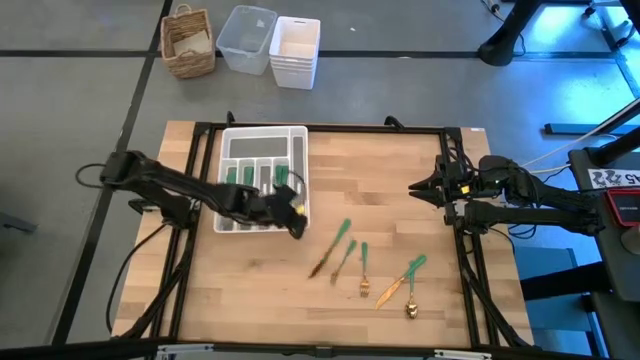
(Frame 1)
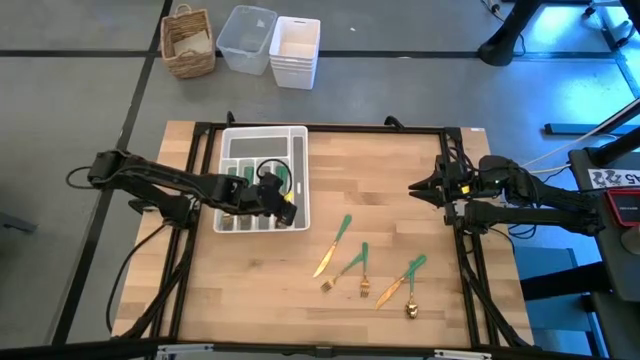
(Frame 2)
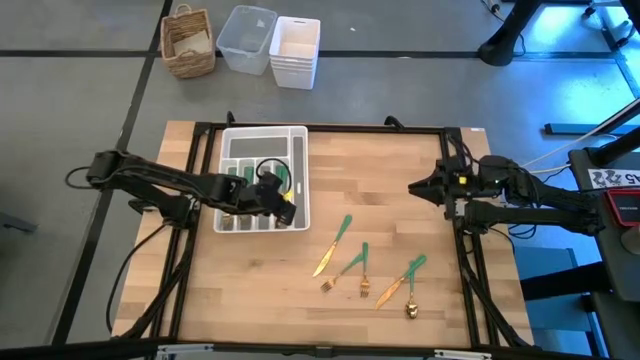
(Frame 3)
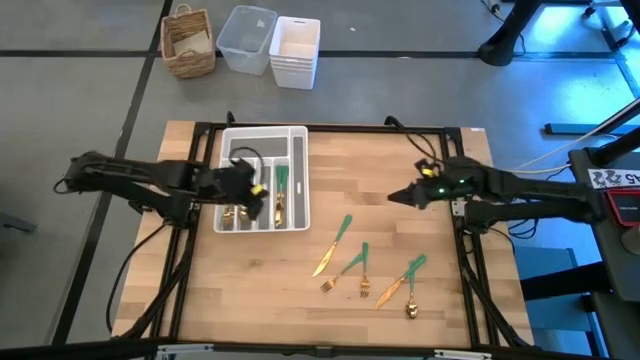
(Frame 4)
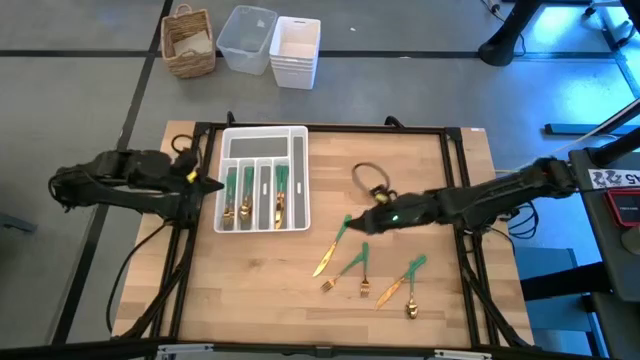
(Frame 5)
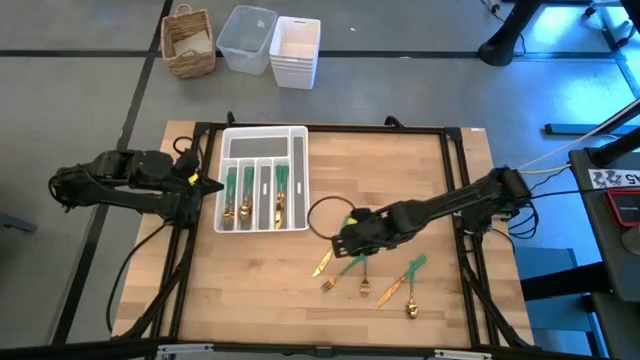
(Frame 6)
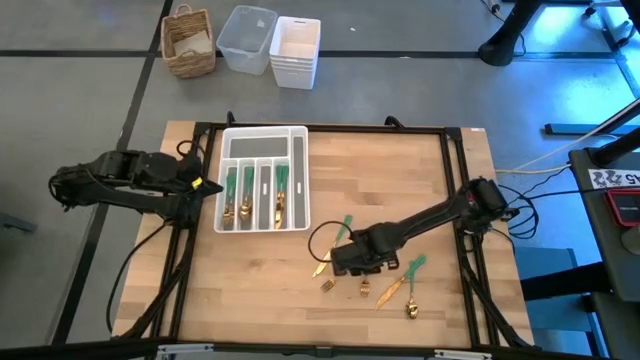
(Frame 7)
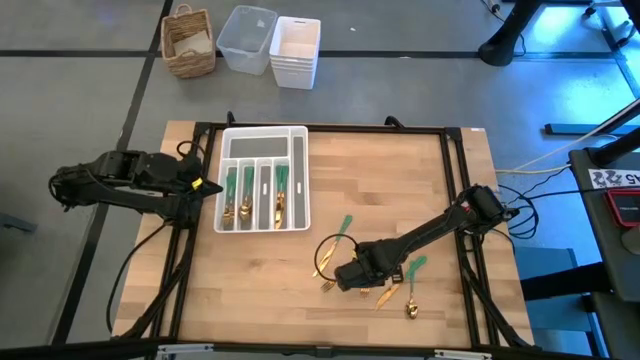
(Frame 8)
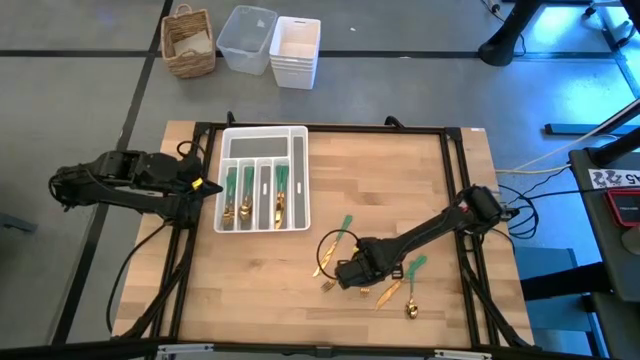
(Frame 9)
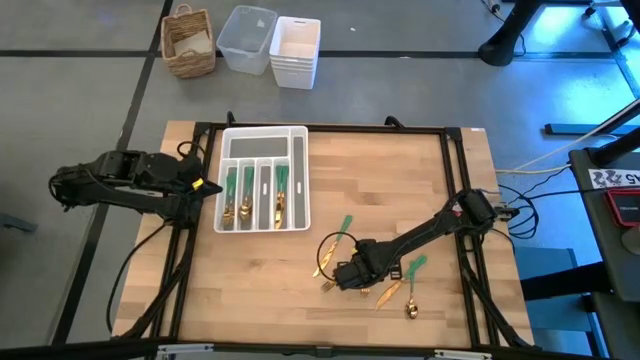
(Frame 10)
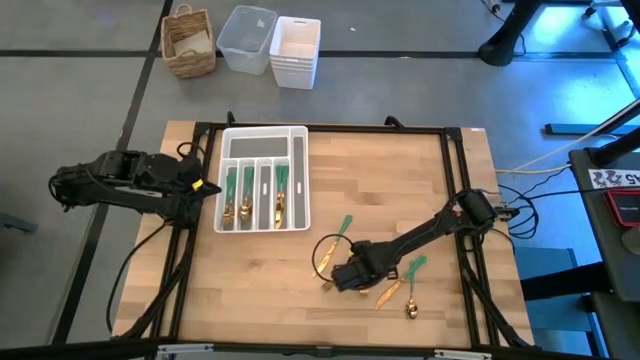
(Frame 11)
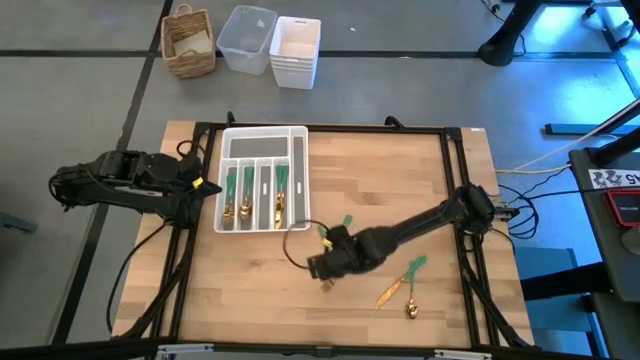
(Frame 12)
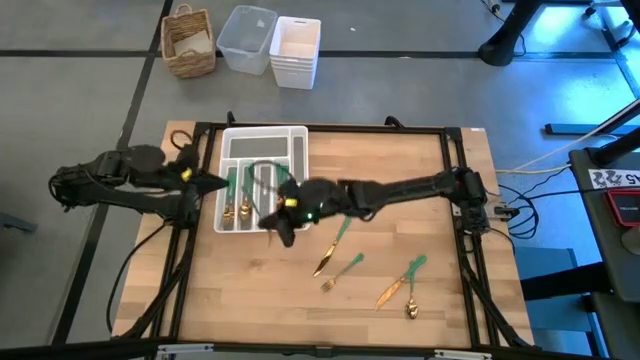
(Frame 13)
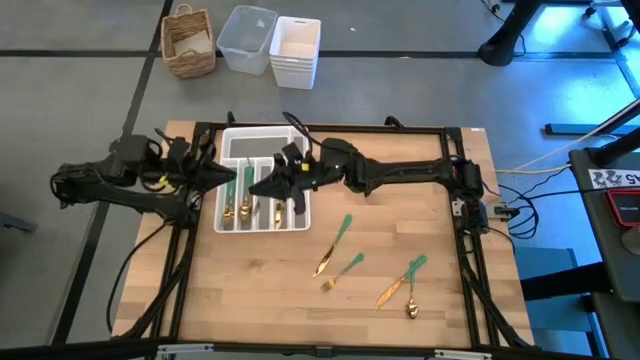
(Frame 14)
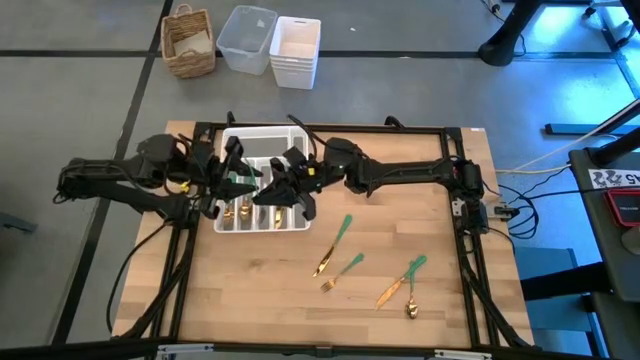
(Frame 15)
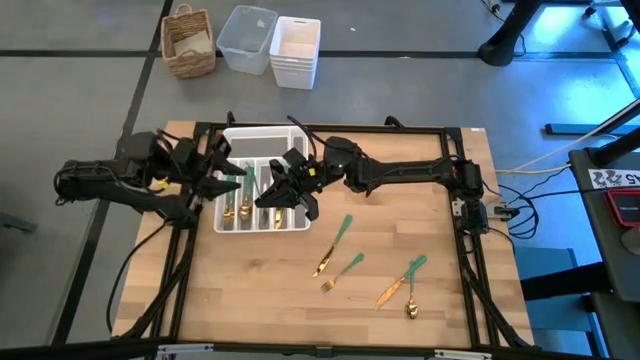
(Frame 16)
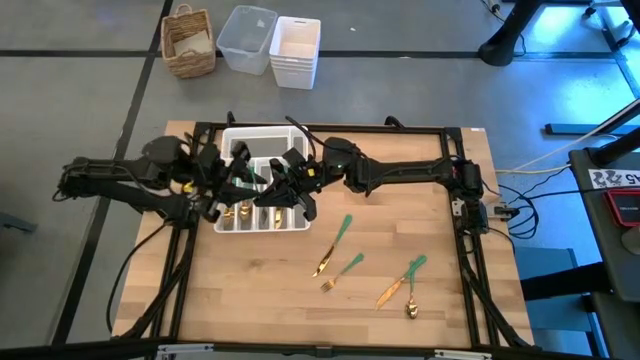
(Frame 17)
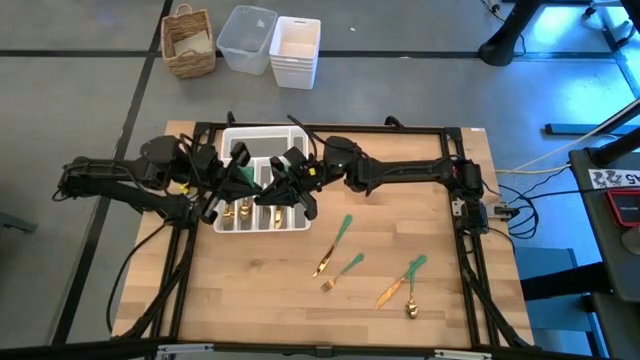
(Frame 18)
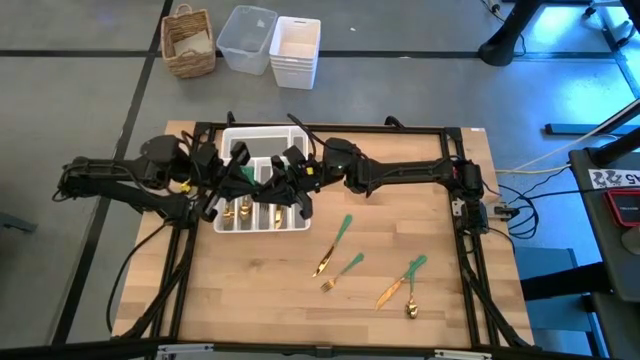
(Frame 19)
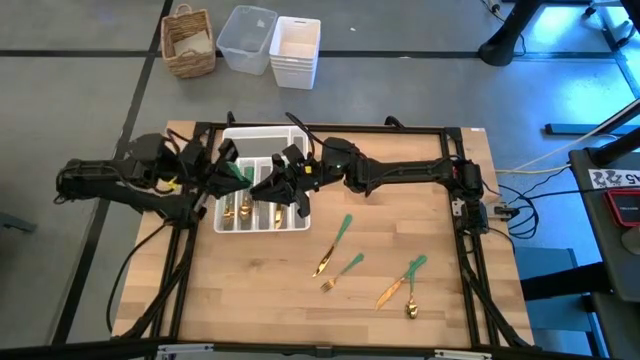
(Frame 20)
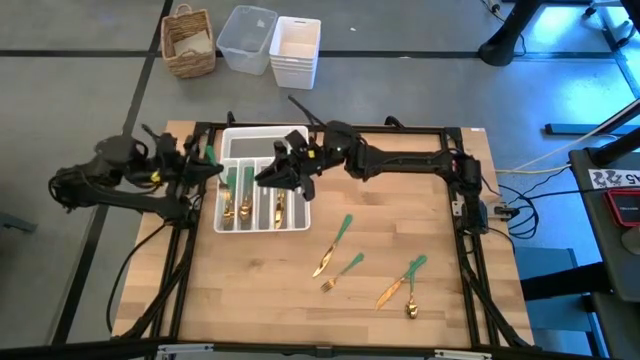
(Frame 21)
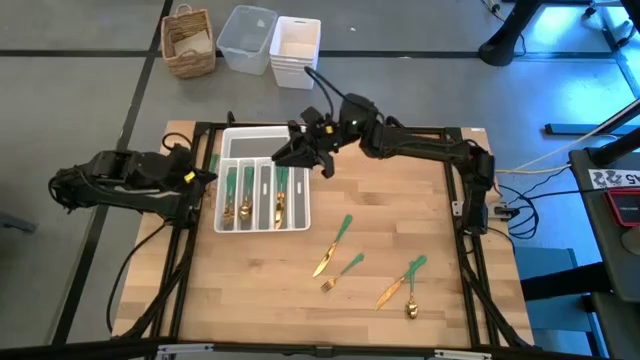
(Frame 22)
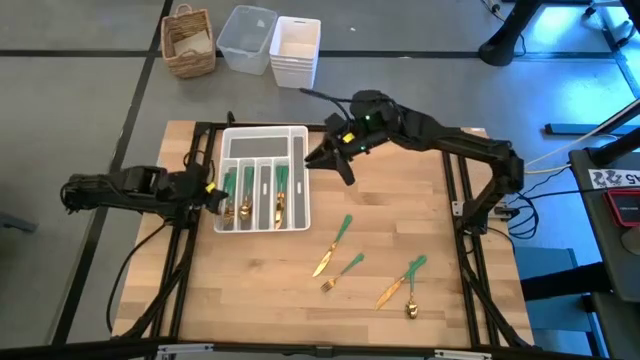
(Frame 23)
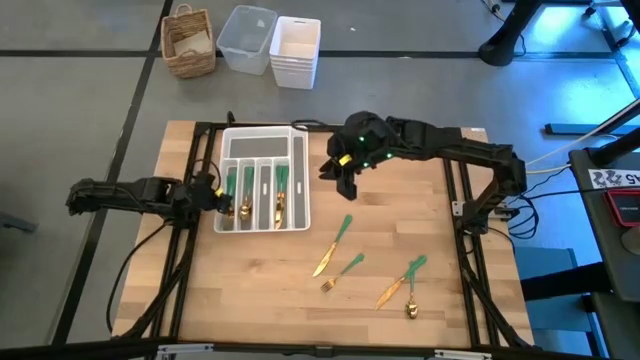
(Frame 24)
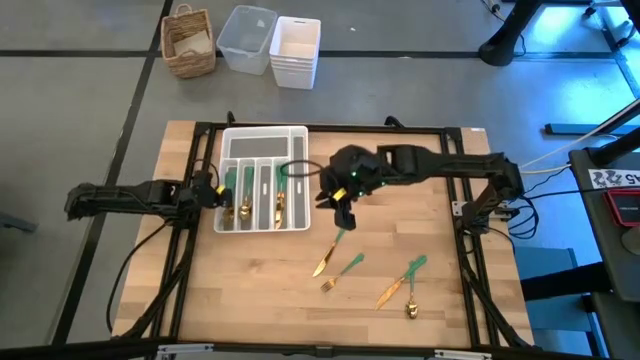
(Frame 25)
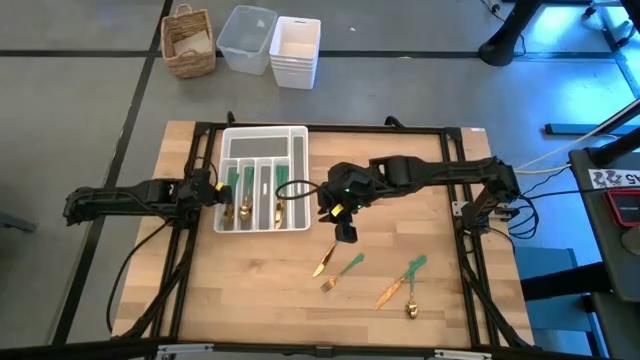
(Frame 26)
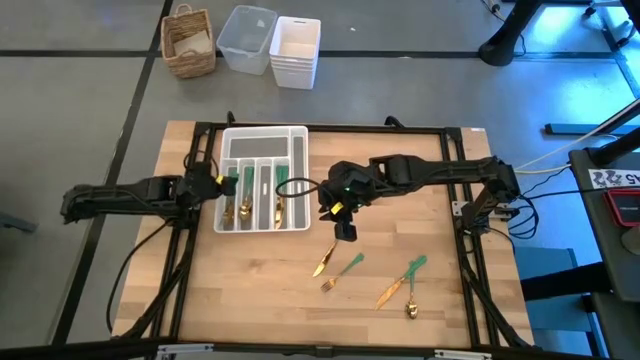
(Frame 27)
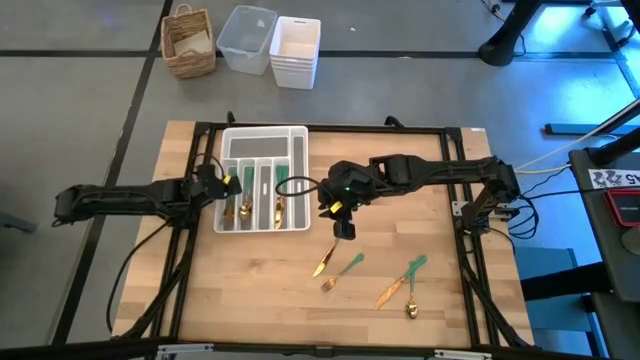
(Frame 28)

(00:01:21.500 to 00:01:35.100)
Task: Sort silverware
Put the green knife into the white silverware tray

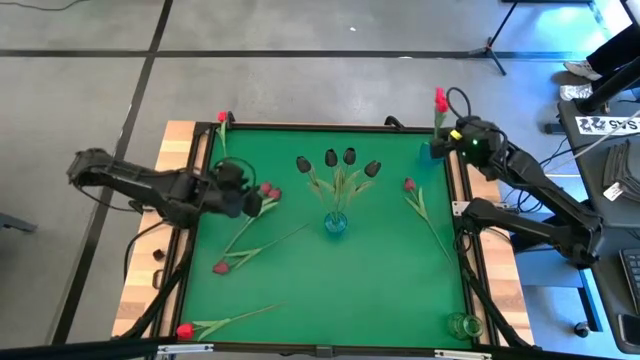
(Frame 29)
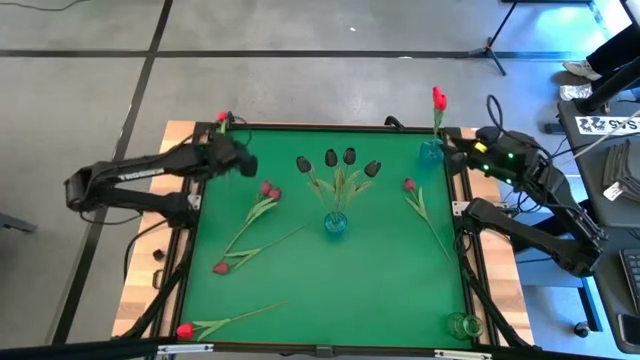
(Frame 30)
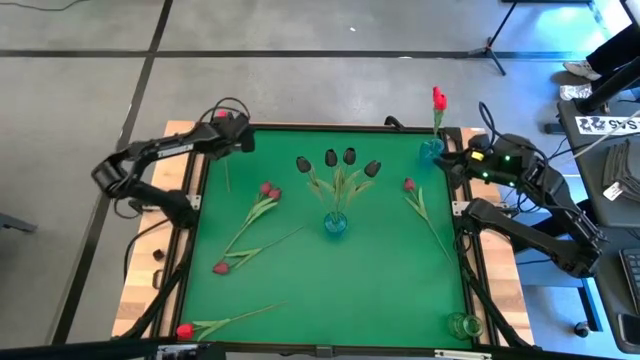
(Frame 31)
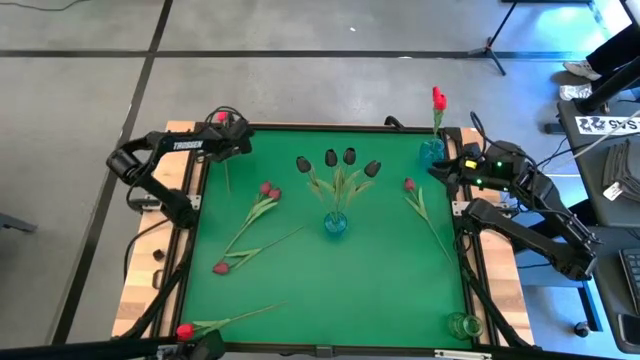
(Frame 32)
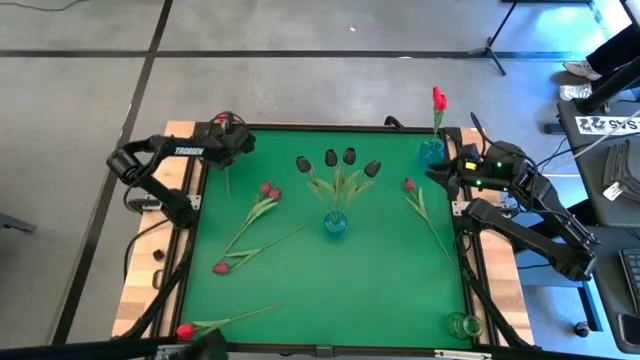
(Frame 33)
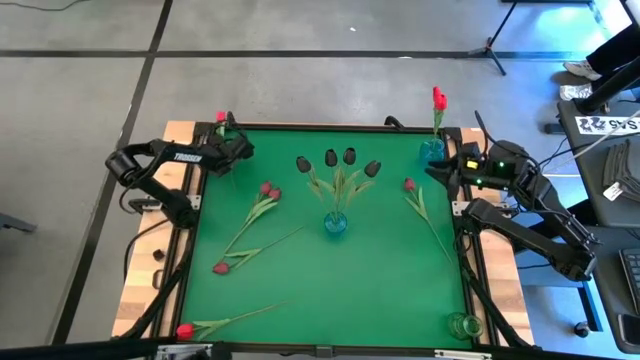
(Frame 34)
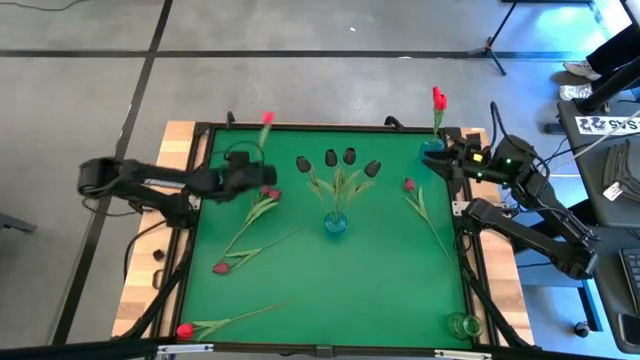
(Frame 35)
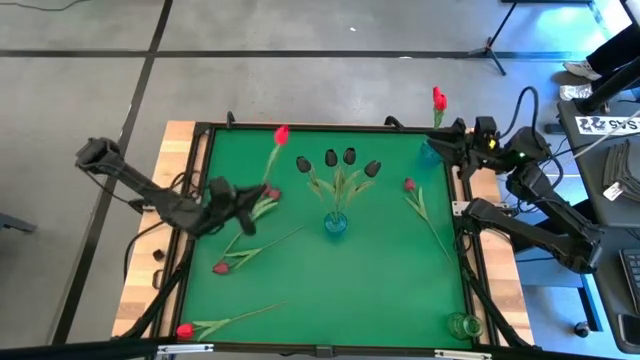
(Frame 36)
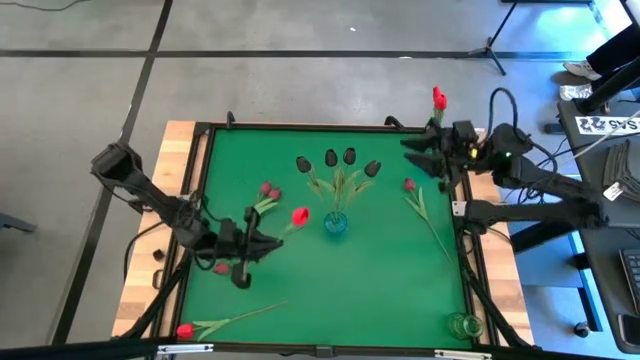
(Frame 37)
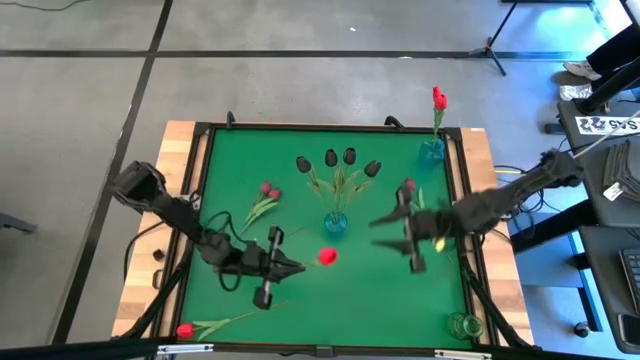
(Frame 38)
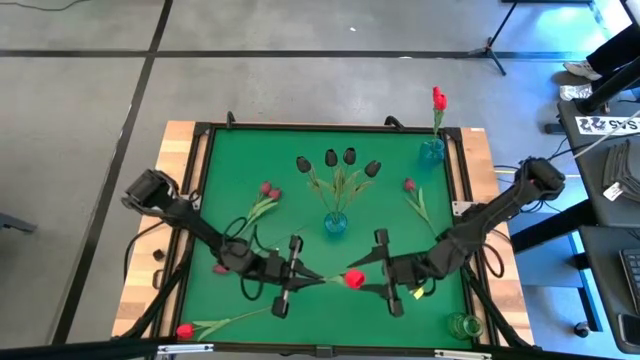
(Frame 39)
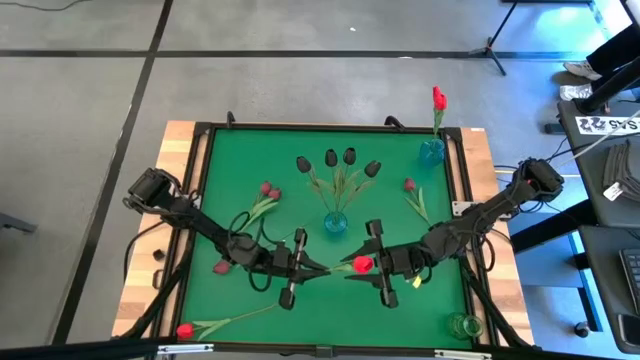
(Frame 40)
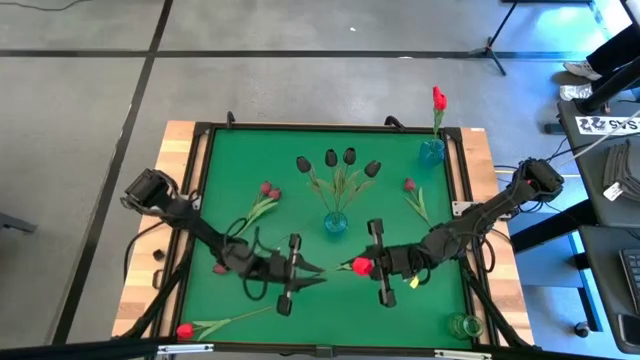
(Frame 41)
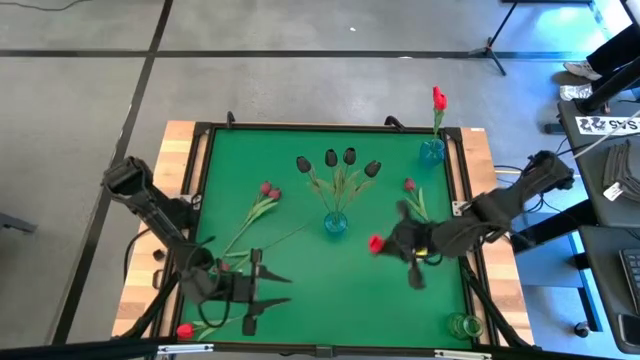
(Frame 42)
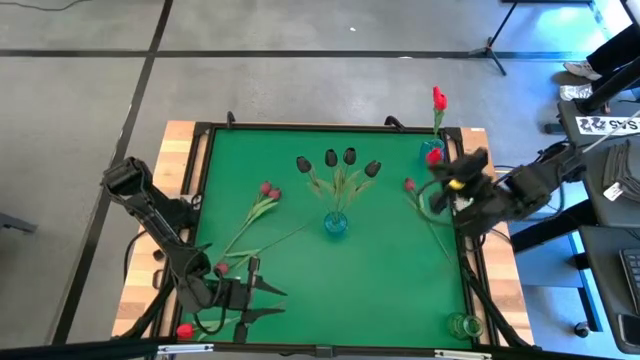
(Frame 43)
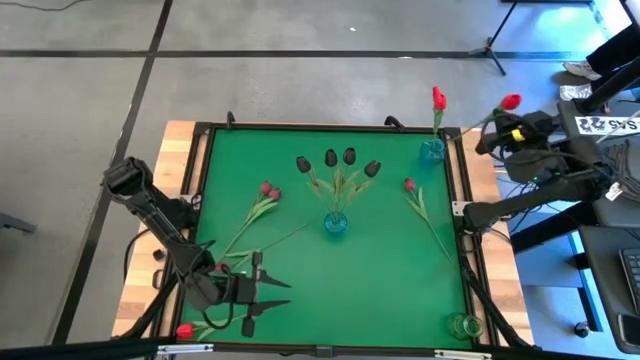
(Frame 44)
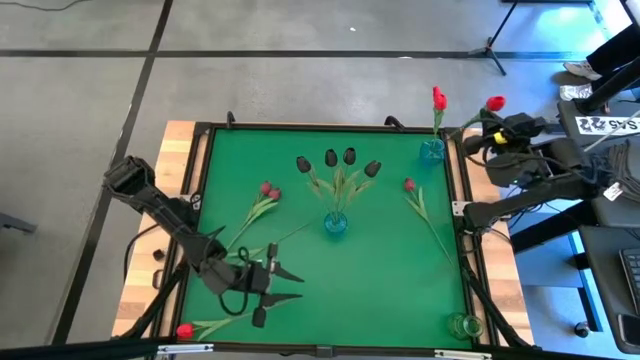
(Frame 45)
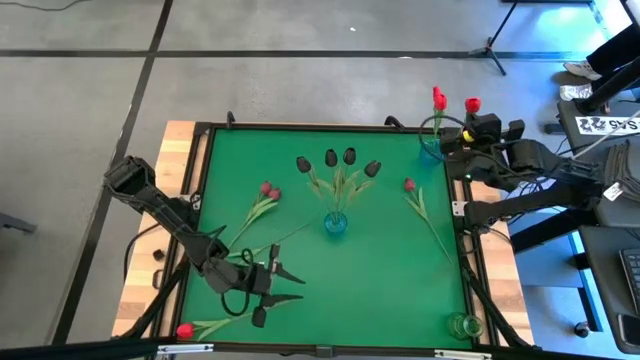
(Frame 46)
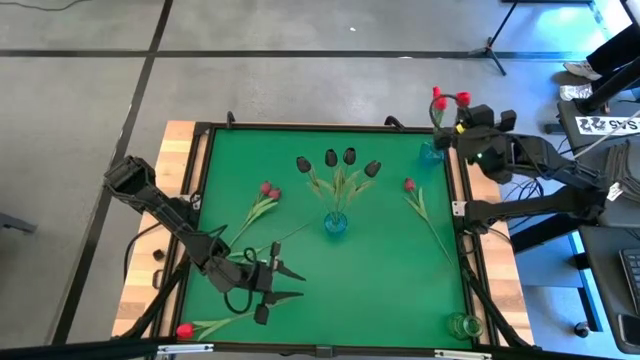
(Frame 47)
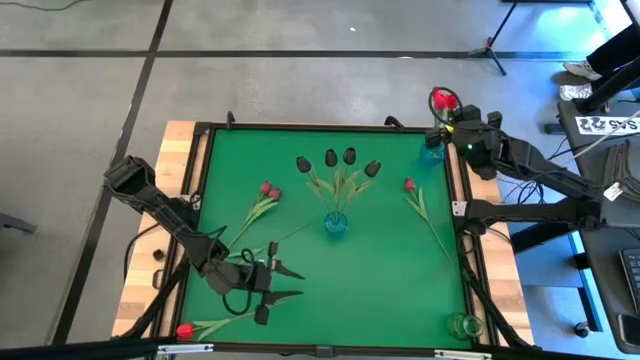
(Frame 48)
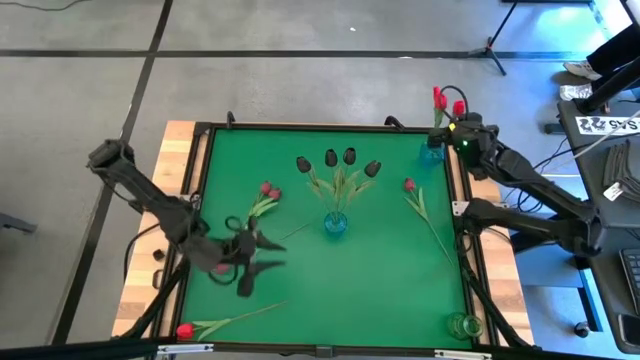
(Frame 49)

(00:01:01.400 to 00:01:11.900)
Task: Sort flowers into vase by color
Put the red tulip into the top blue vase
